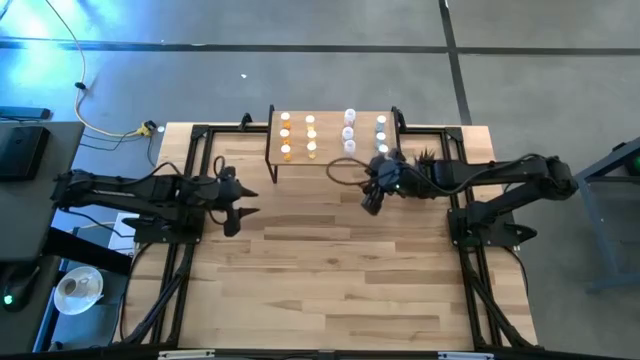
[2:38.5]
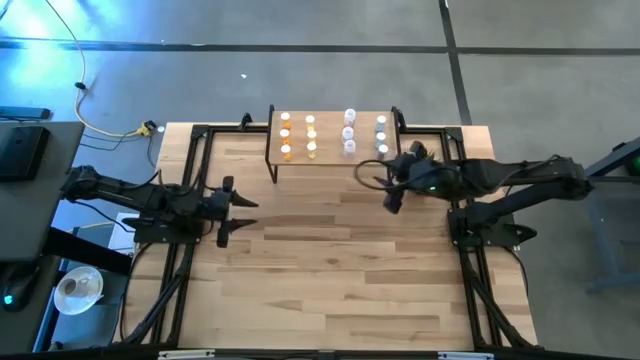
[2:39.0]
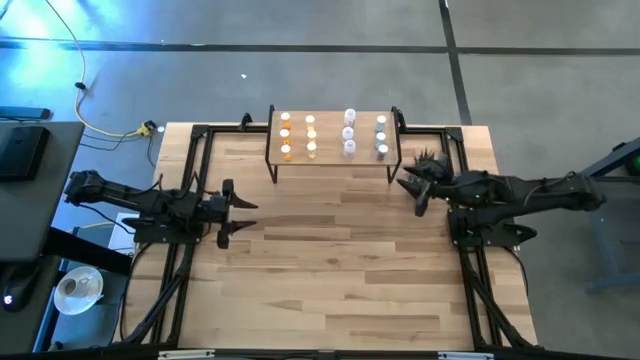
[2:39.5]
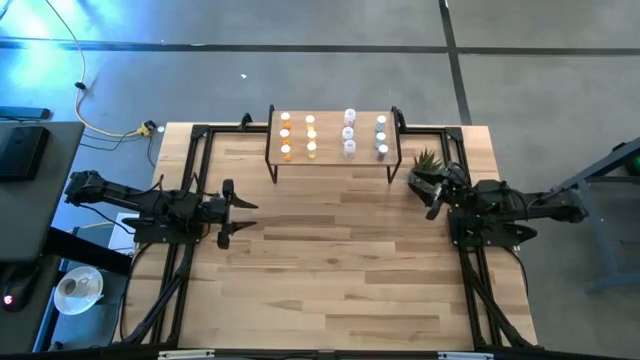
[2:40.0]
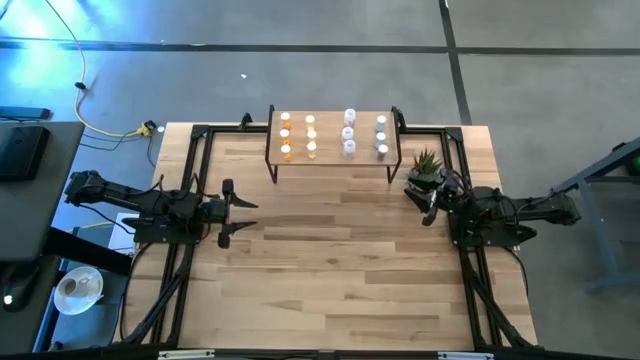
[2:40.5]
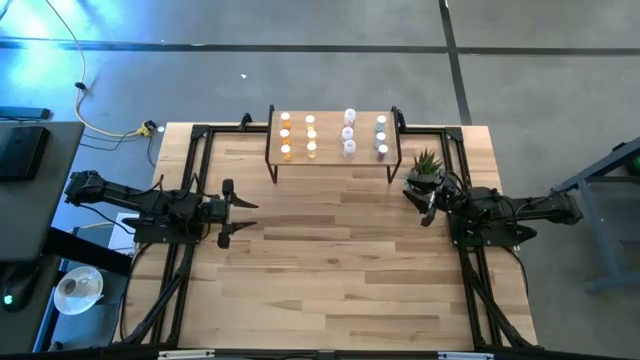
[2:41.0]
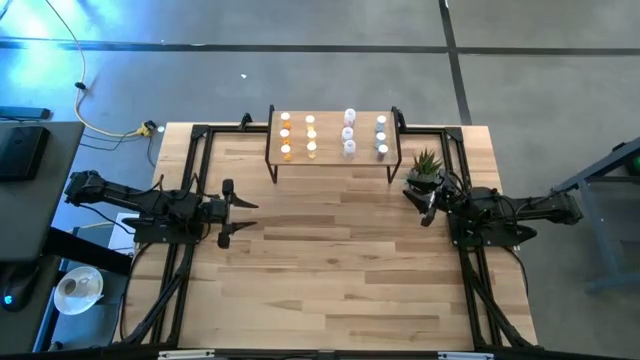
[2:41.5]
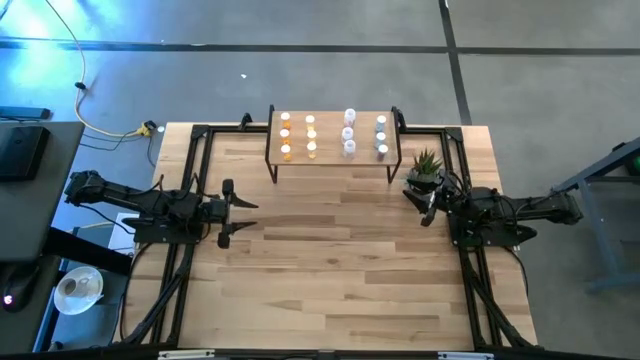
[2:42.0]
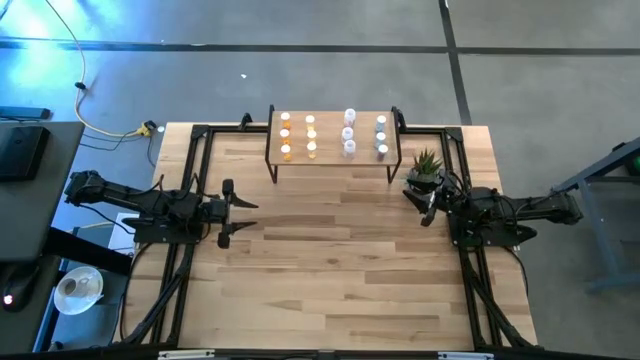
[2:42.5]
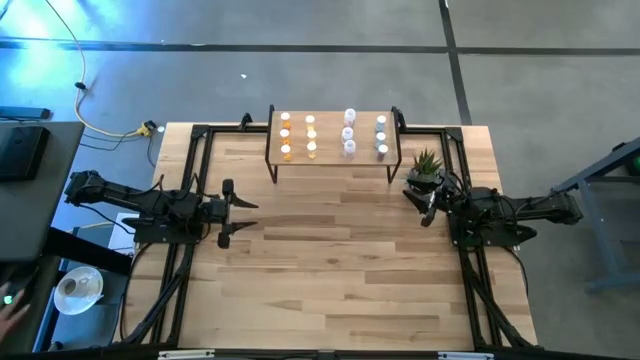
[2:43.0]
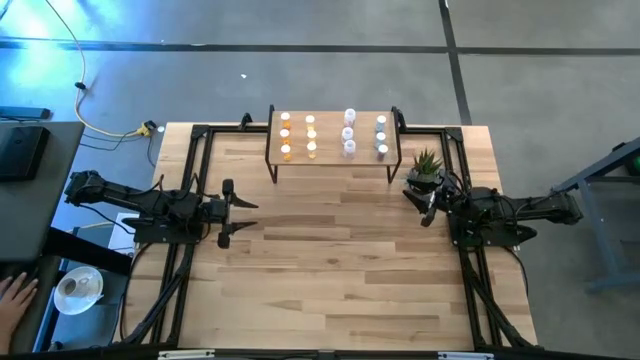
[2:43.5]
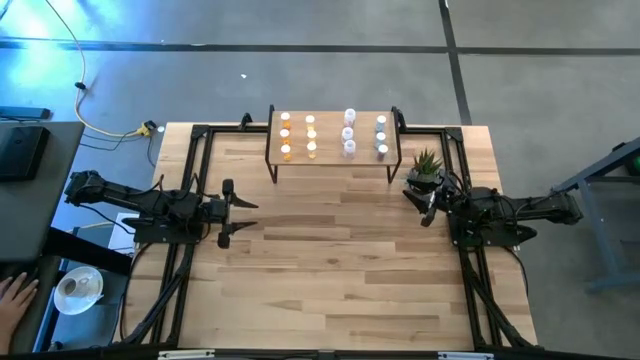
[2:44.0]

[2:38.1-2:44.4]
Task: Pick and place medicine bottles onto shelf by color
Return to Home Position

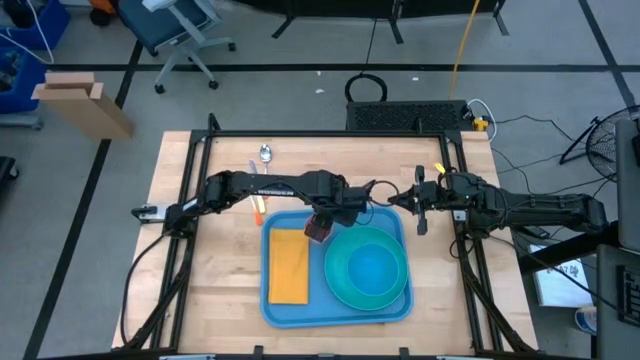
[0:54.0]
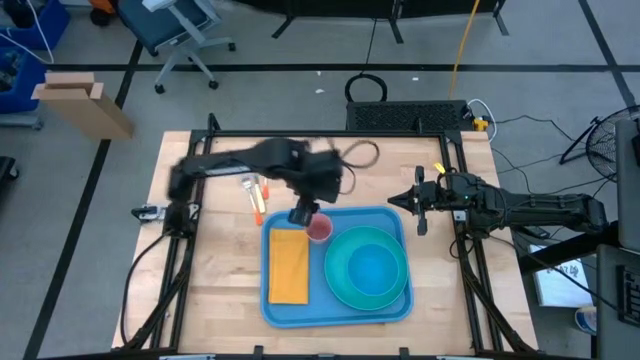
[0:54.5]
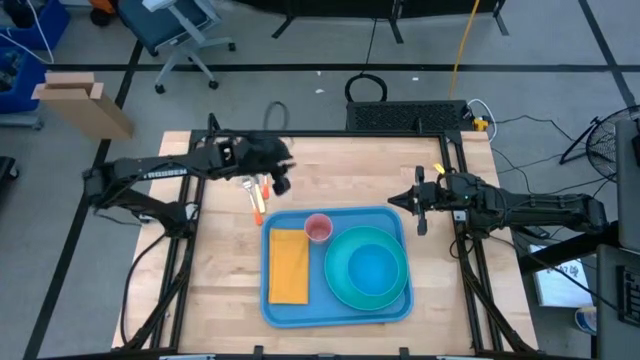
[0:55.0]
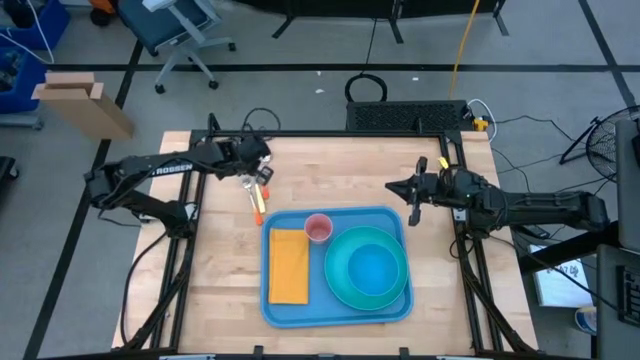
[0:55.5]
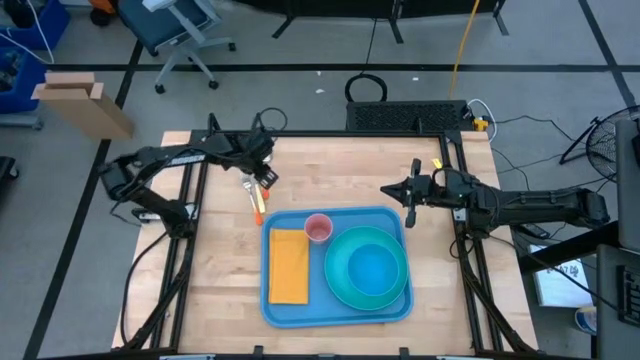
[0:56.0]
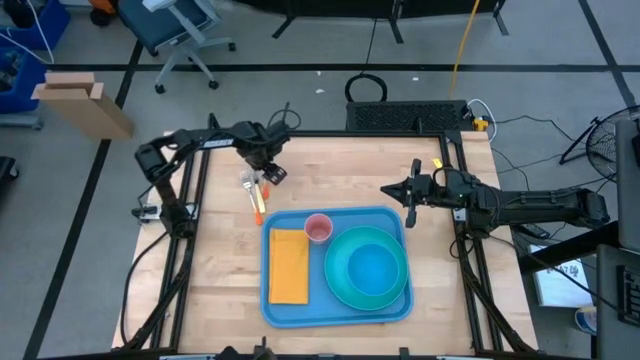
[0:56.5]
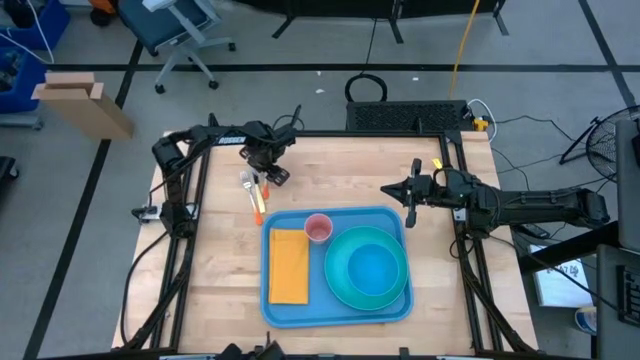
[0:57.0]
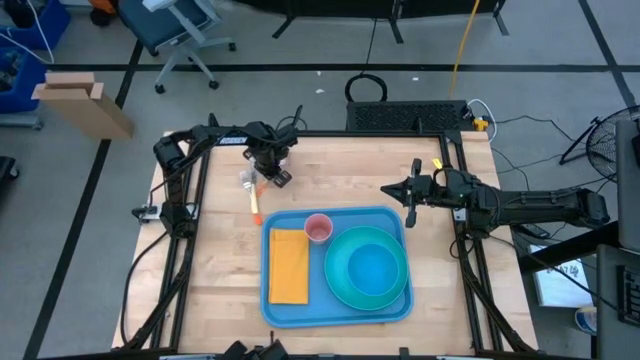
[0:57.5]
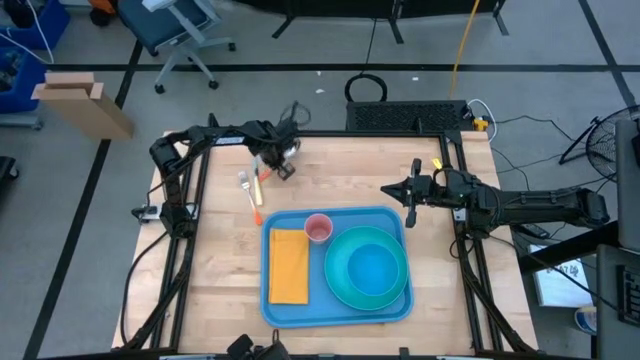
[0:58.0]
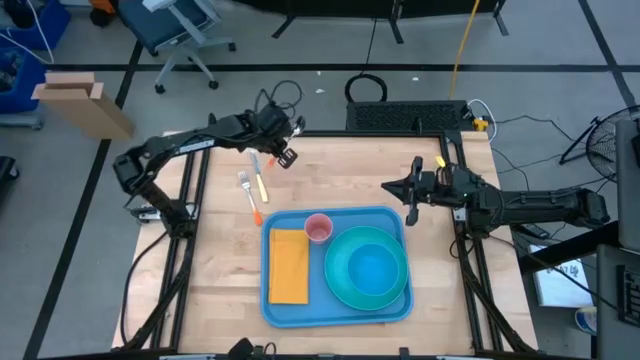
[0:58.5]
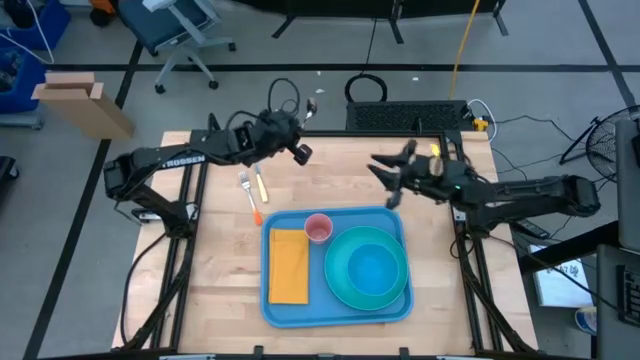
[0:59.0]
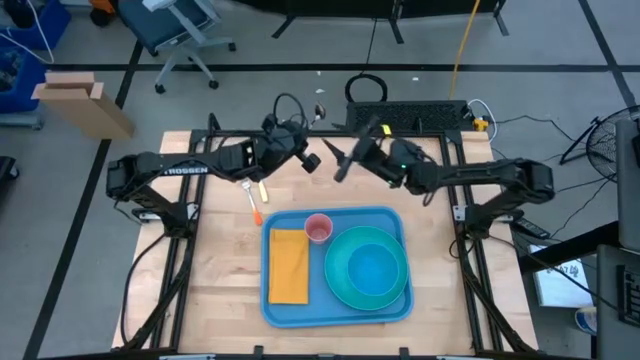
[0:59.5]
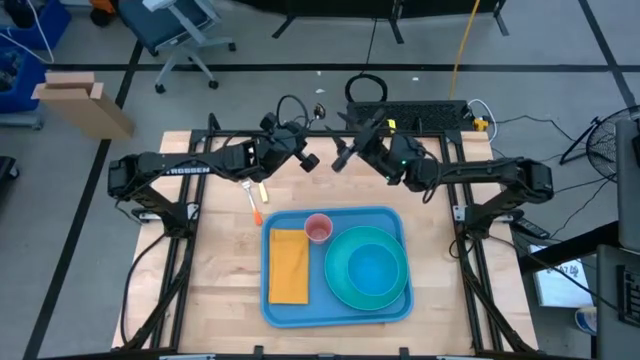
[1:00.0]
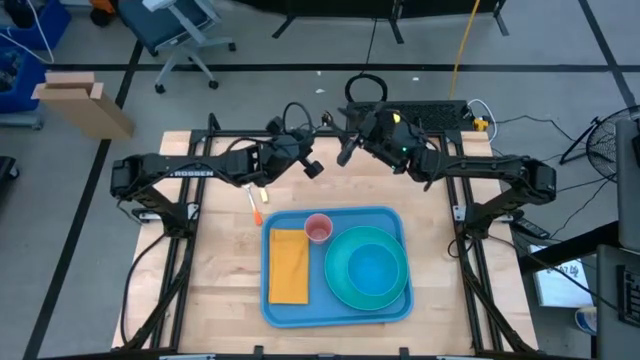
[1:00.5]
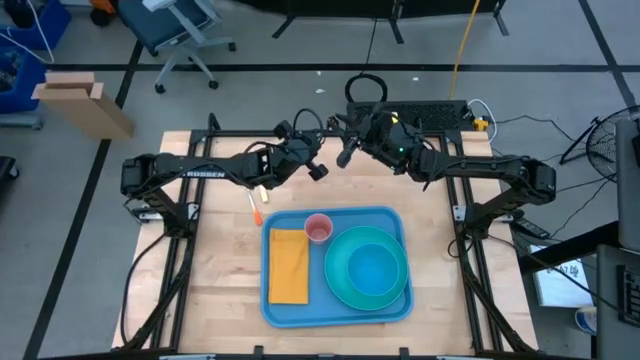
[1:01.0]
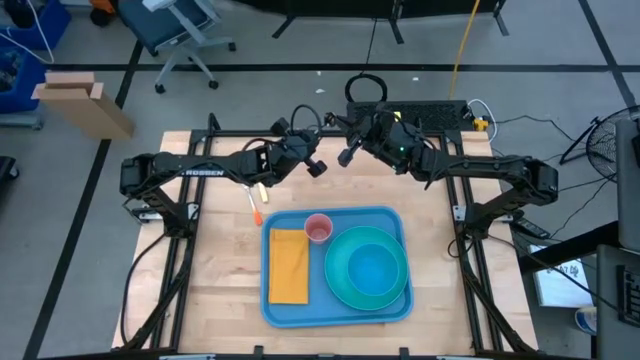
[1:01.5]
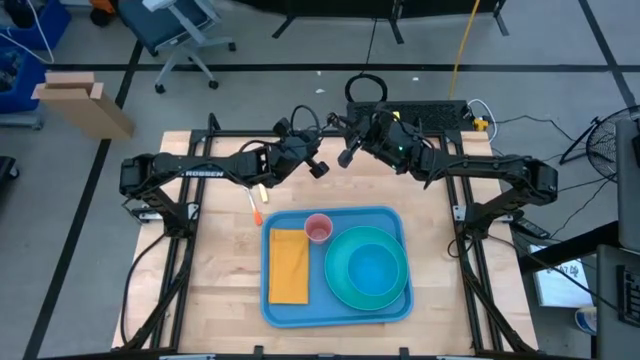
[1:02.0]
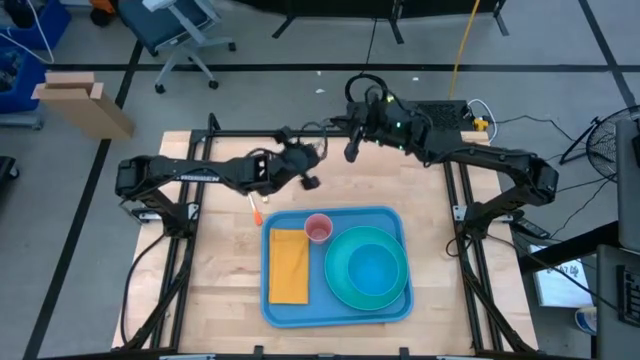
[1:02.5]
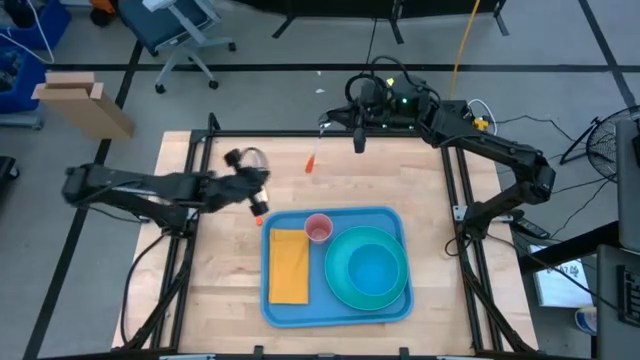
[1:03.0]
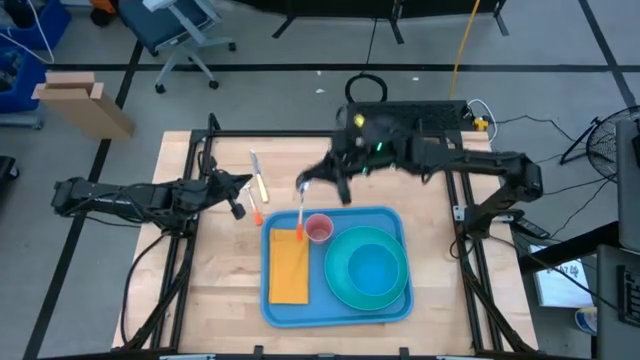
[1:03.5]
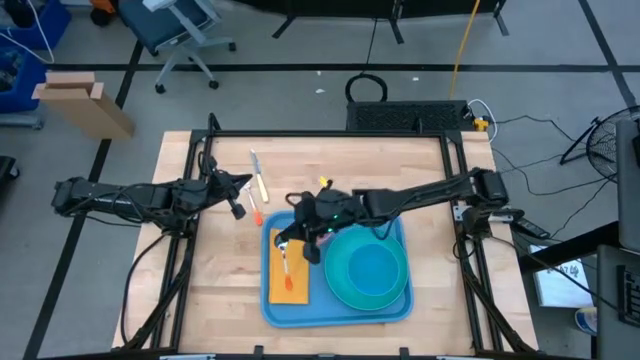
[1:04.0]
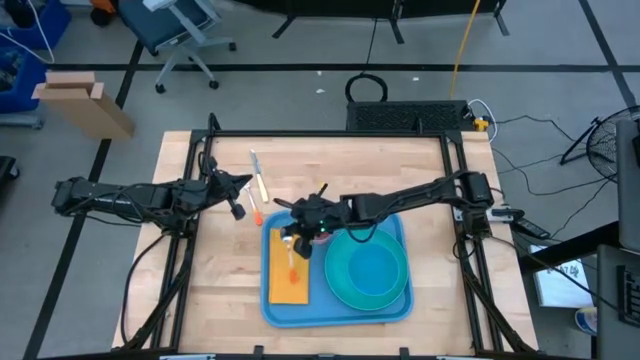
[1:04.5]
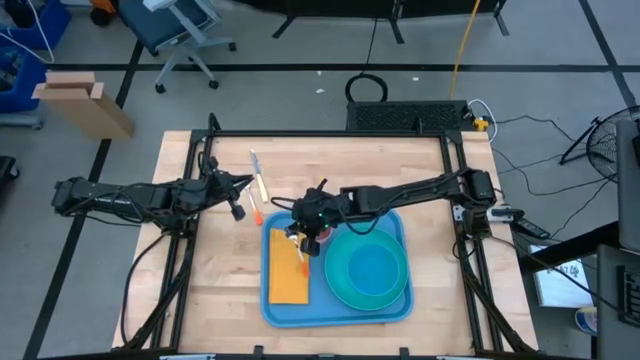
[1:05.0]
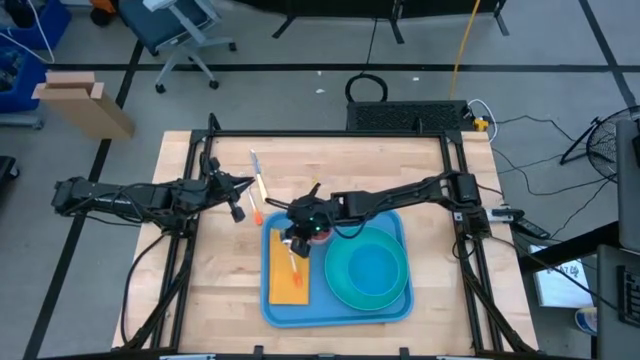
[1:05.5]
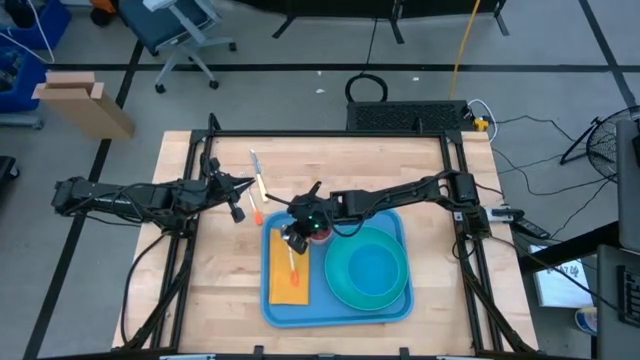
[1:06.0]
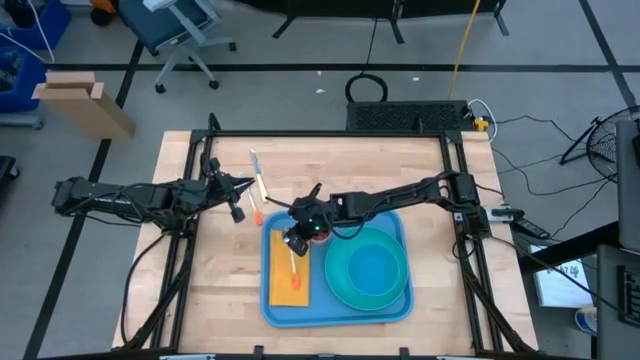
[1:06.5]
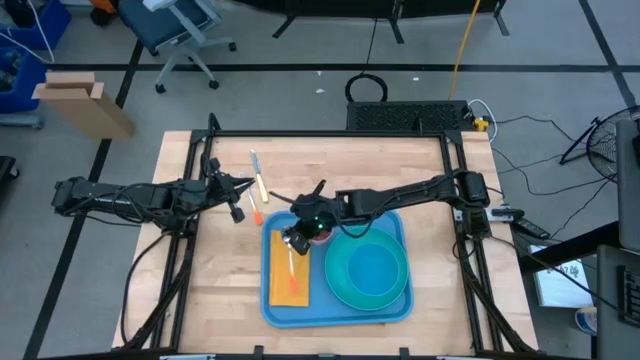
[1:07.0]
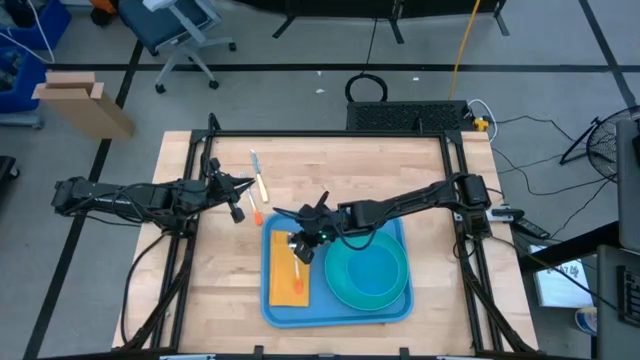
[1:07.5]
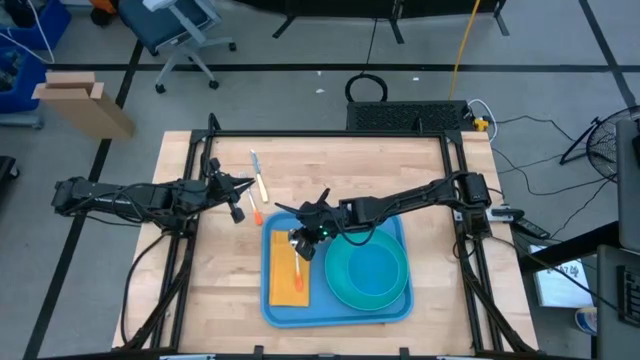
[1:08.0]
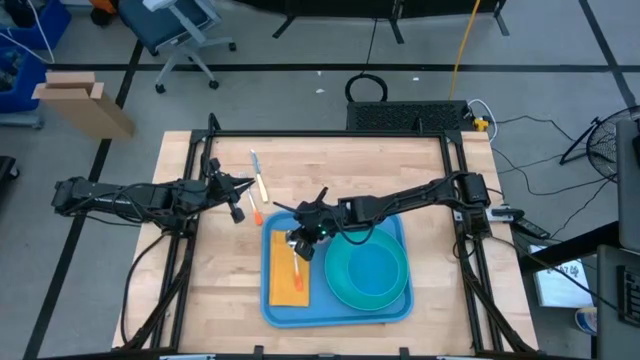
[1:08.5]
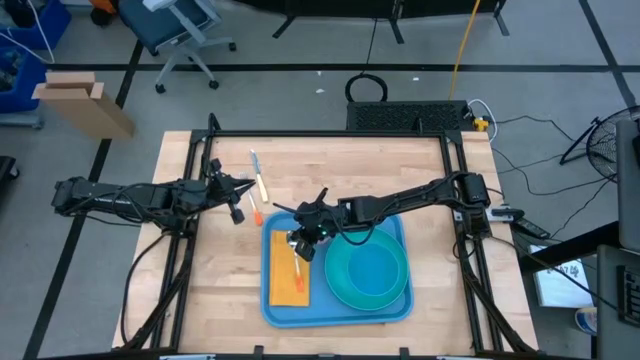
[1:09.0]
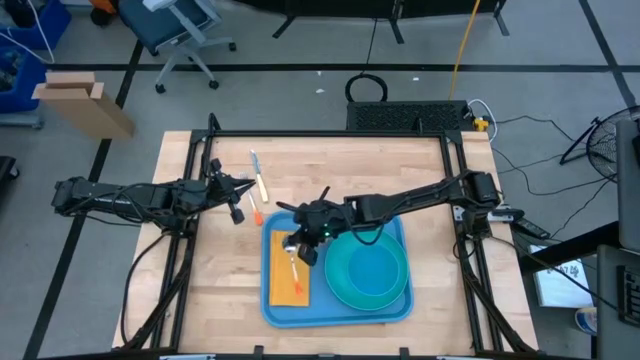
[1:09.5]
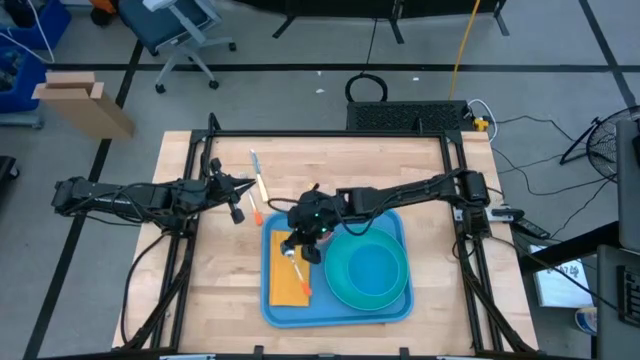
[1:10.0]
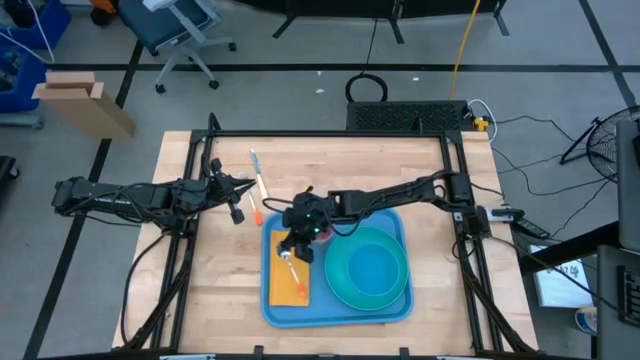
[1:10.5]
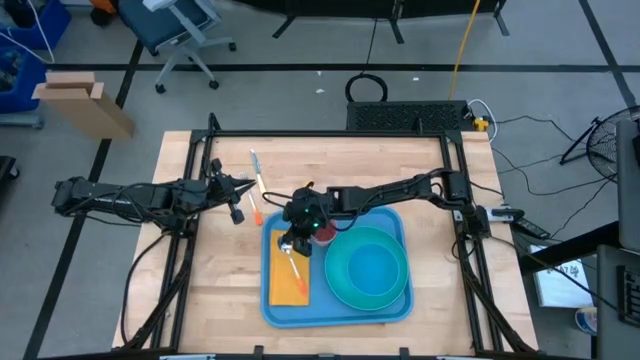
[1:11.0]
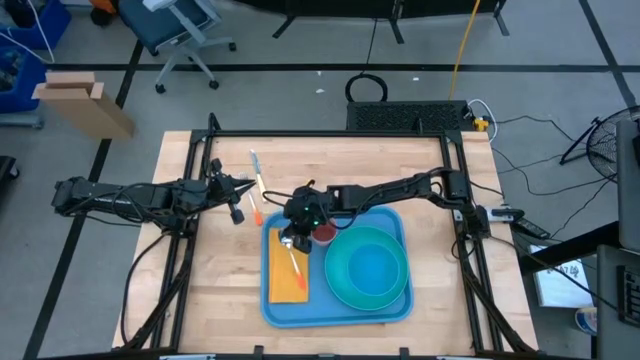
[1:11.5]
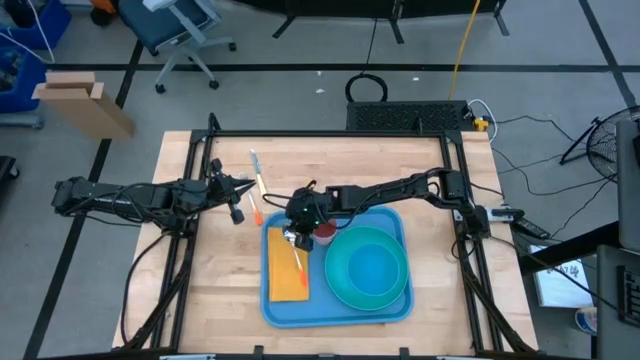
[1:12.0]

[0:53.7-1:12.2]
Task: Set up tray
Put the orange spoon on the yellow napkin
